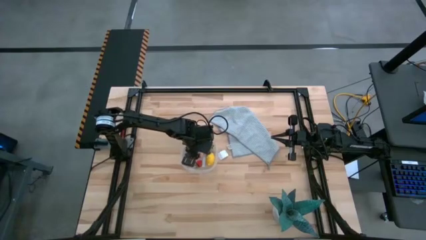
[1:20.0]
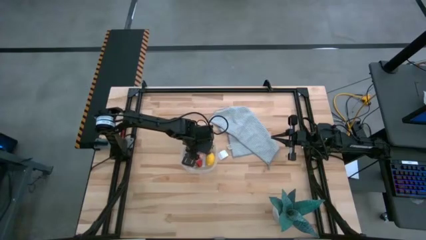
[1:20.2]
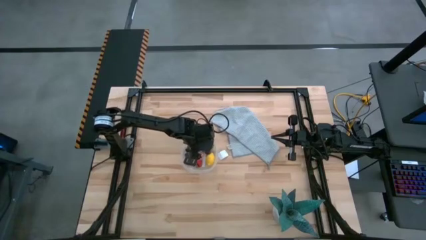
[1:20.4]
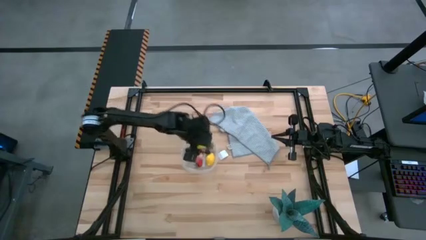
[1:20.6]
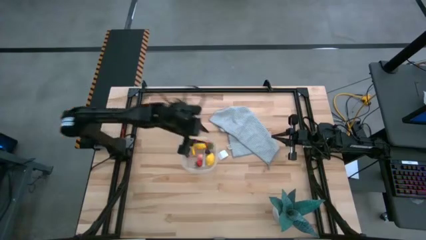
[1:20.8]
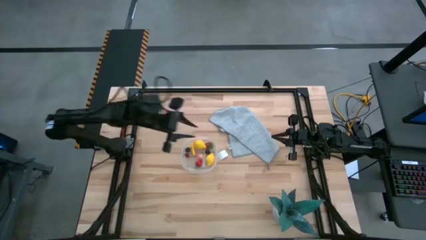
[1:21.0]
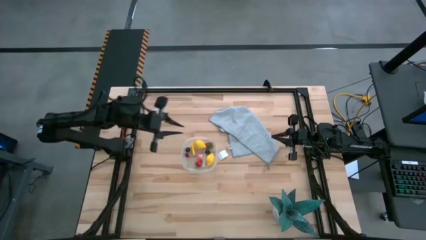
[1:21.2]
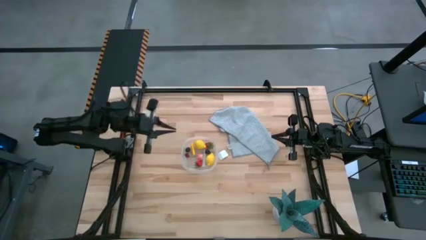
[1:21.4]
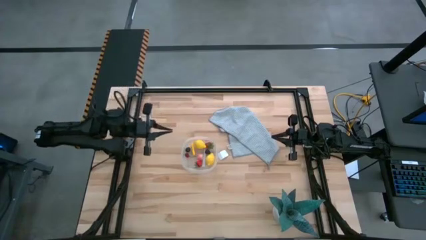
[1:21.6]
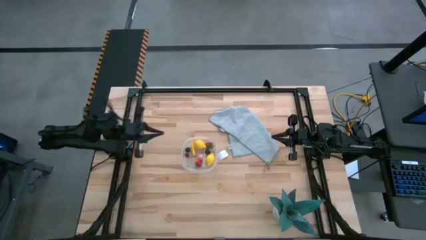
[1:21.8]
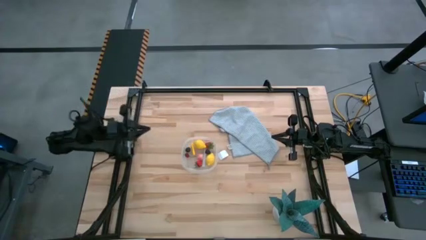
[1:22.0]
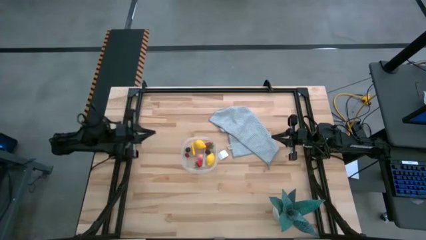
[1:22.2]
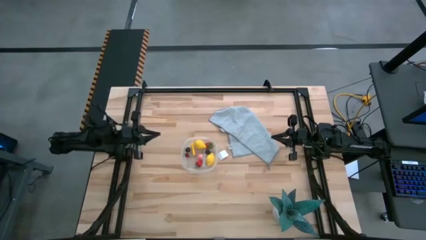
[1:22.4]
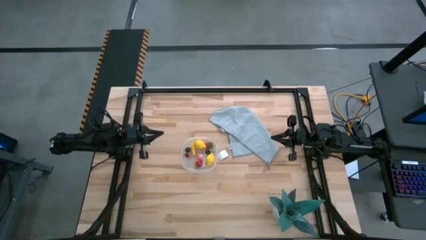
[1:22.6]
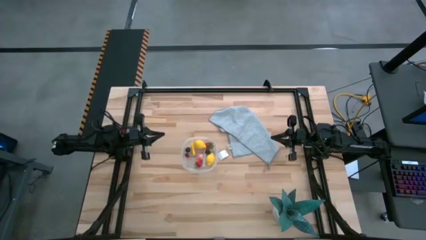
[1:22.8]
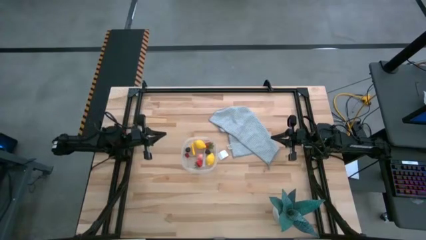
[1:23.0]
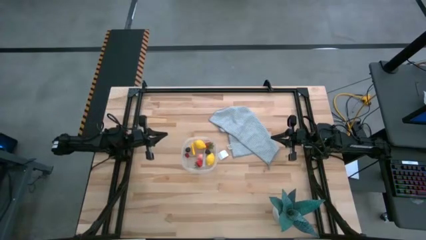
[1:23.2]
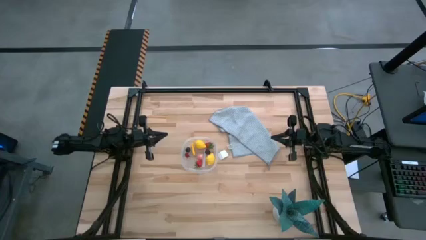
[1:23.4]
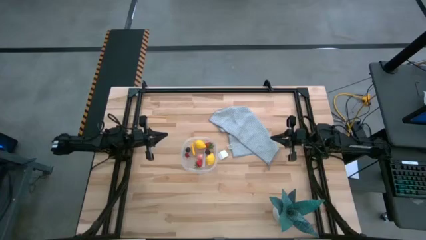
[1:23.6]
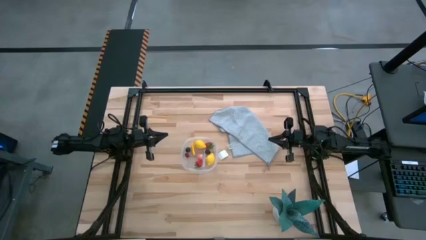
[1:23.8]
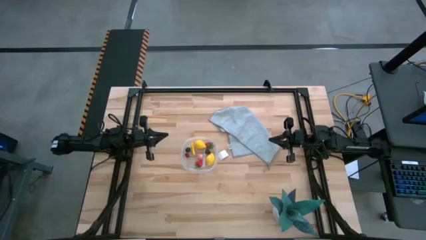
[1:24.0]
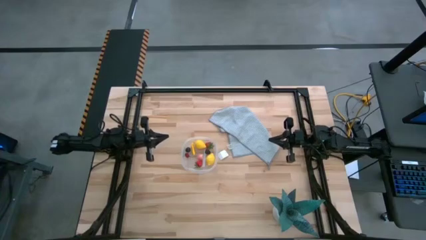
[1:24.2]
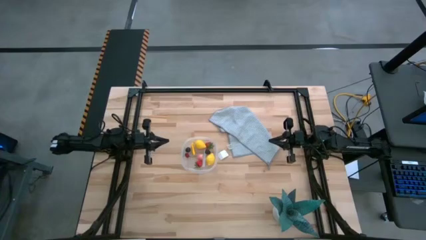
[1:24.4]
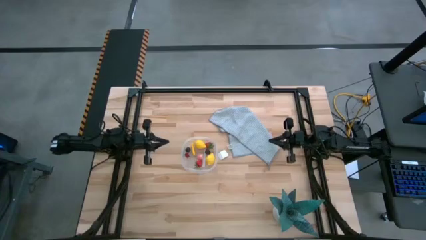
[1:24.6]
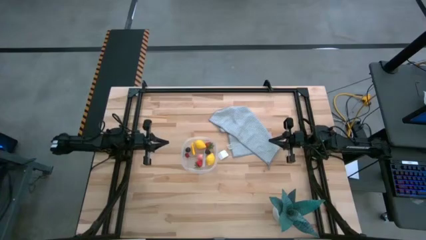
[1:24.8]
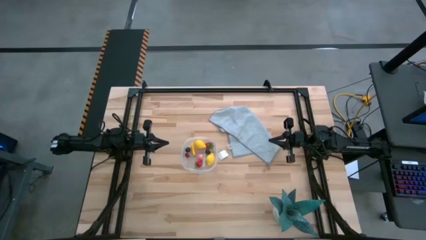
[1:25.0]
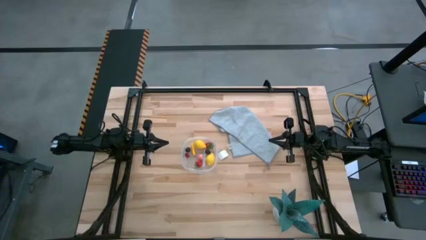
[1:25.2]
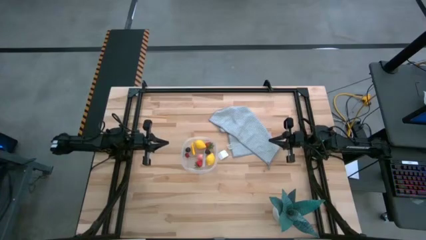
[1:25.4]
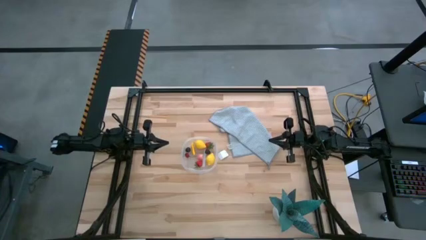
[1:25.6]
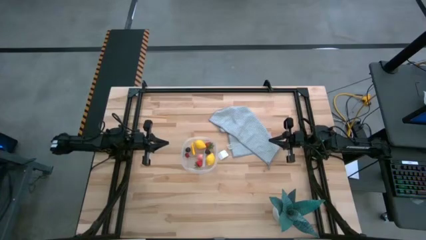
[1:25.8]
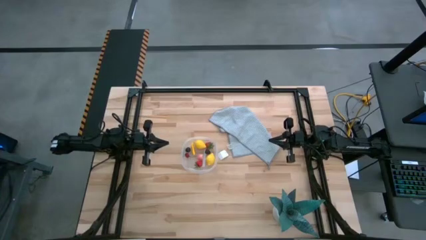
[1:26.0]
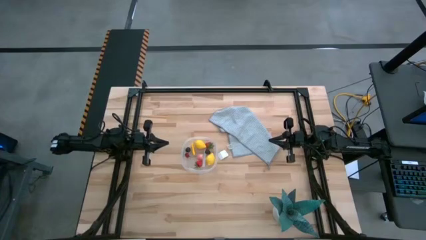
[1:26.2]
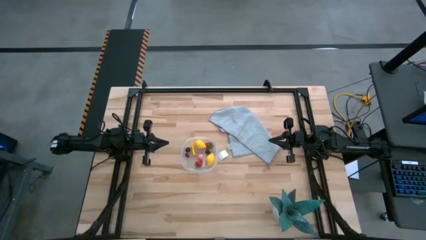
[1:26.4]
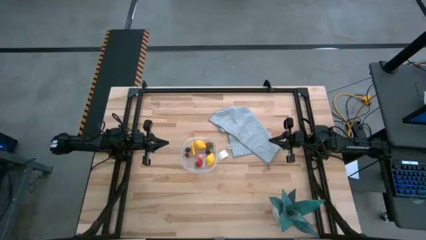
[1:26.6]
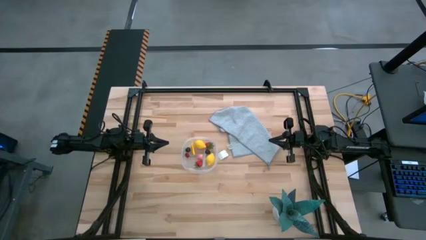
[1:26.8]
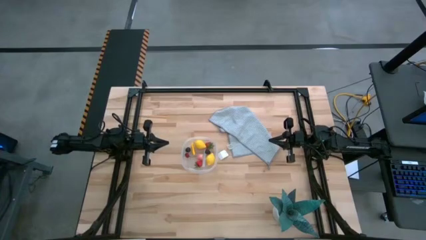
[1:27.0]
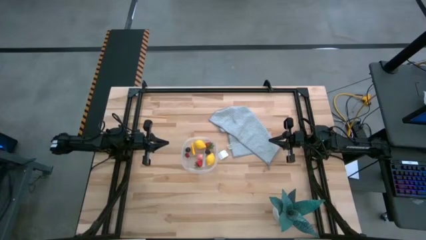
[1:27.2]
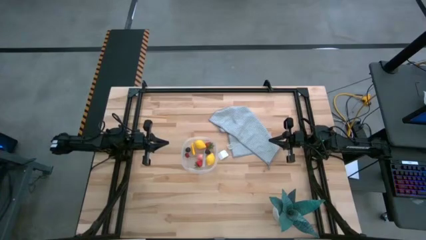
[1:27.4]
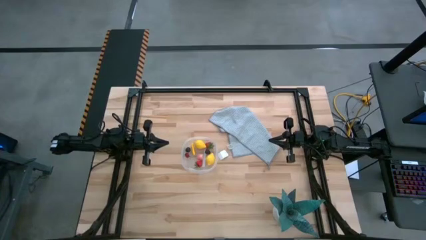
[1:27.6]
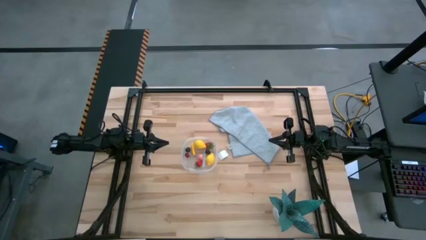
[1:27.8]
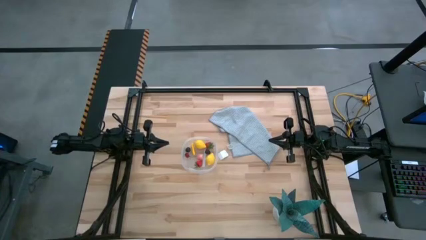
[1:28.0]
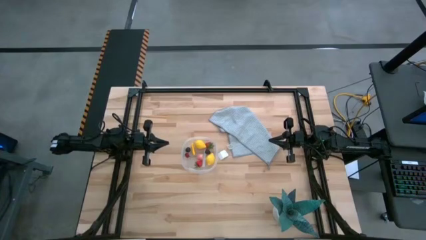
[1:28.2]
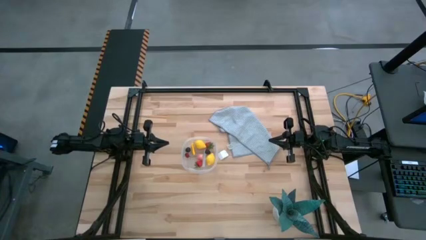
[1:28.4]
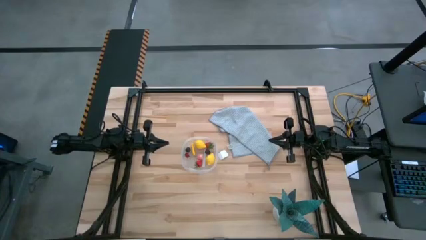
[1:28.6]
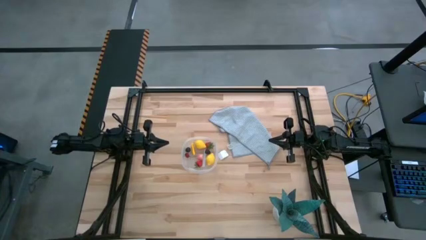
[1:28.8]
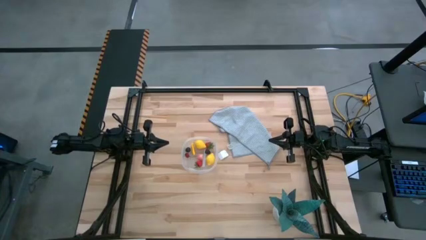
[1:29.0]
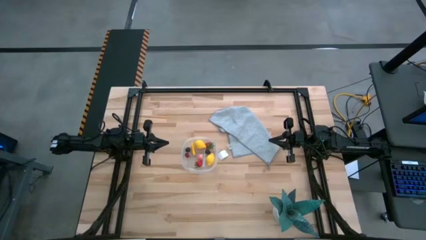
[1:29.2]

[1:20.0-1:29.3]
Task: Pick and placing Produce into tupperware
Return to Home Position

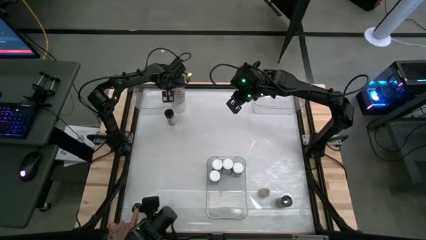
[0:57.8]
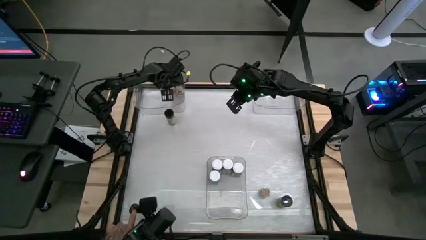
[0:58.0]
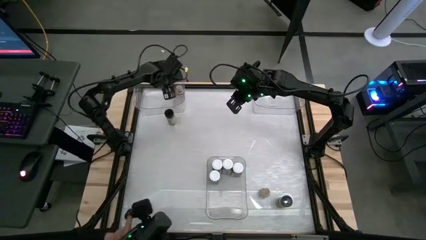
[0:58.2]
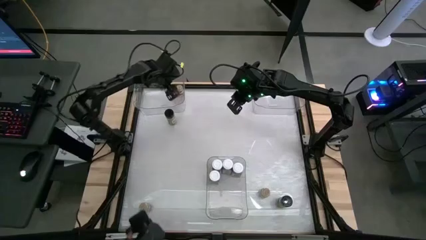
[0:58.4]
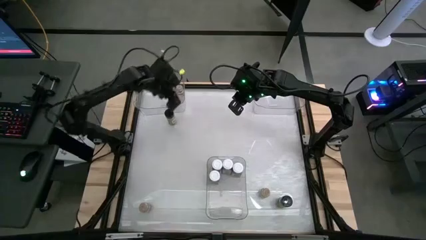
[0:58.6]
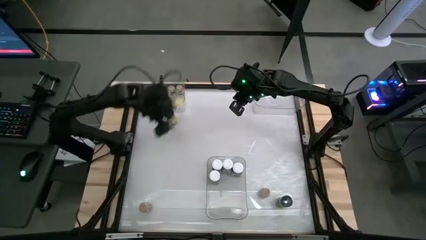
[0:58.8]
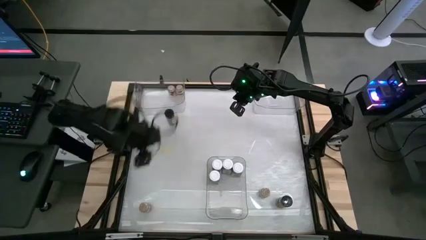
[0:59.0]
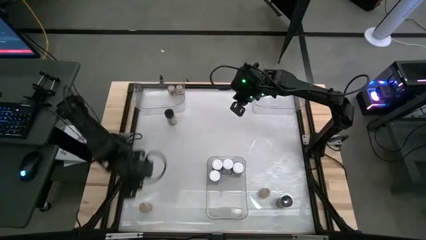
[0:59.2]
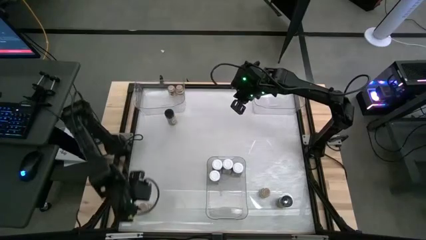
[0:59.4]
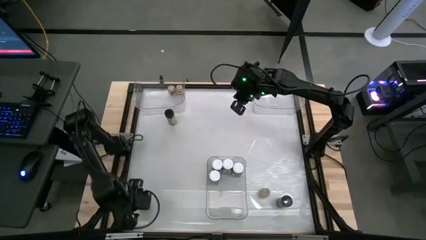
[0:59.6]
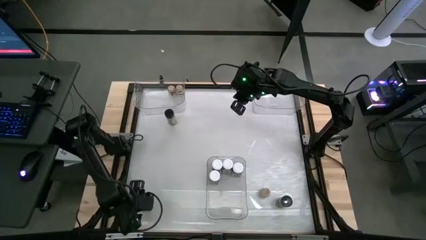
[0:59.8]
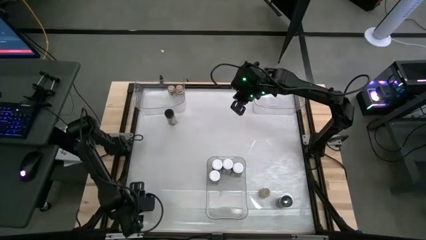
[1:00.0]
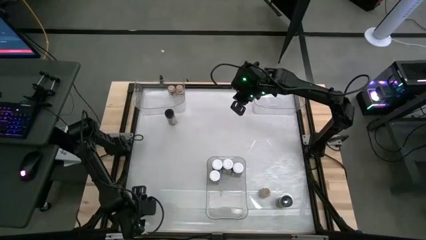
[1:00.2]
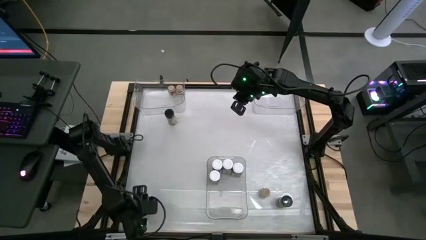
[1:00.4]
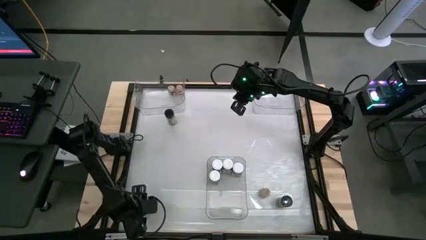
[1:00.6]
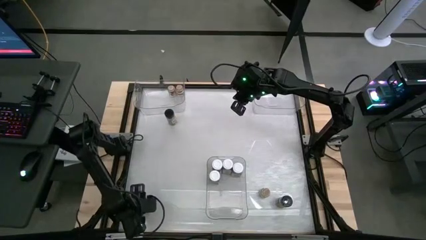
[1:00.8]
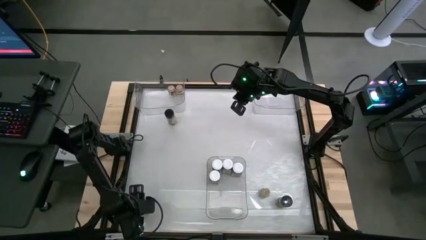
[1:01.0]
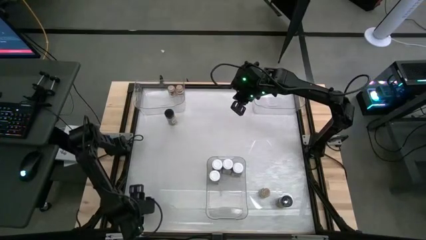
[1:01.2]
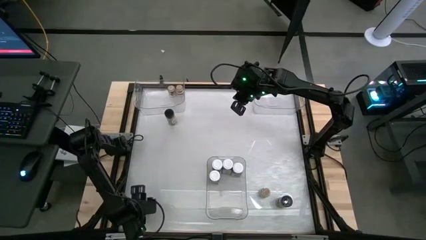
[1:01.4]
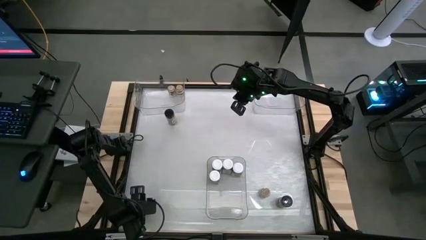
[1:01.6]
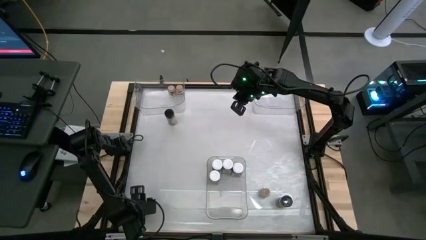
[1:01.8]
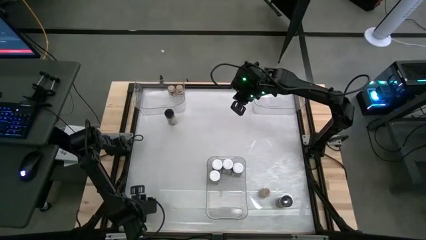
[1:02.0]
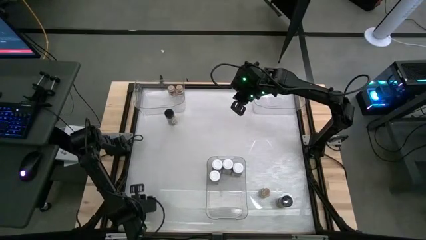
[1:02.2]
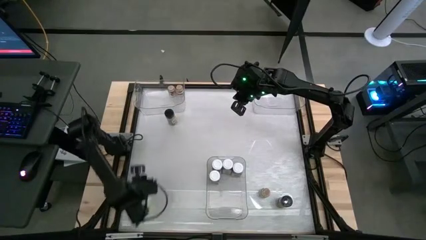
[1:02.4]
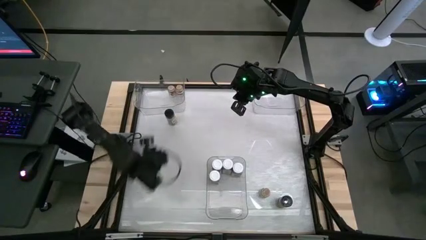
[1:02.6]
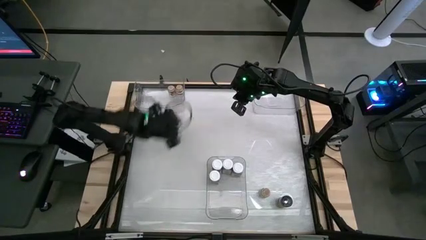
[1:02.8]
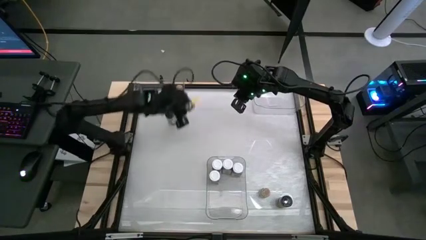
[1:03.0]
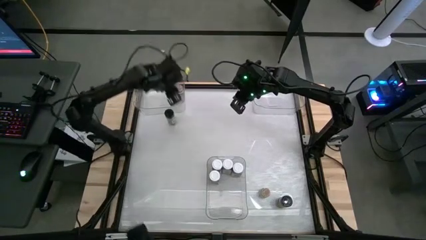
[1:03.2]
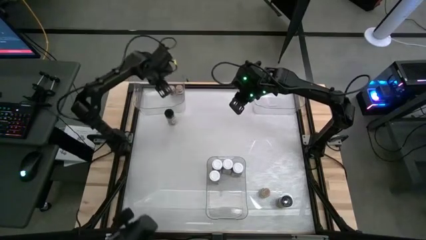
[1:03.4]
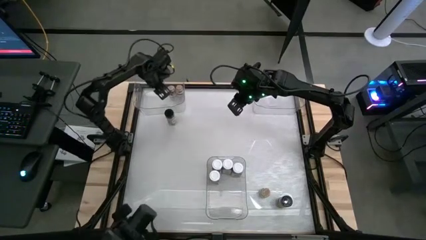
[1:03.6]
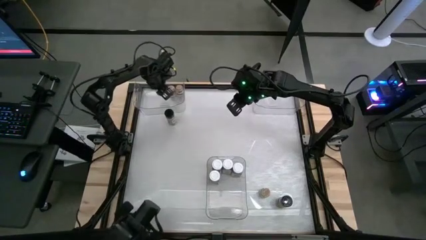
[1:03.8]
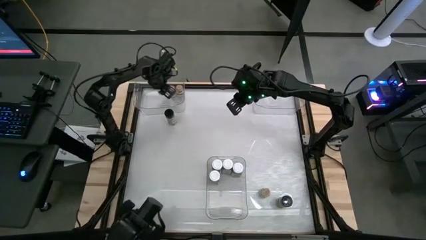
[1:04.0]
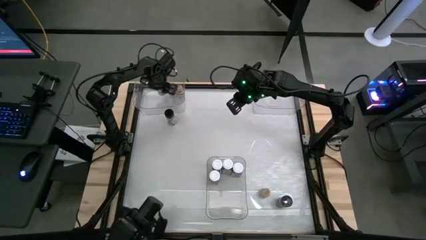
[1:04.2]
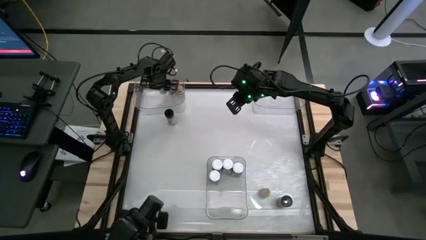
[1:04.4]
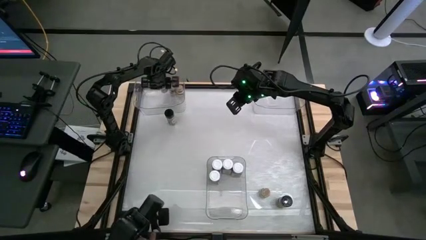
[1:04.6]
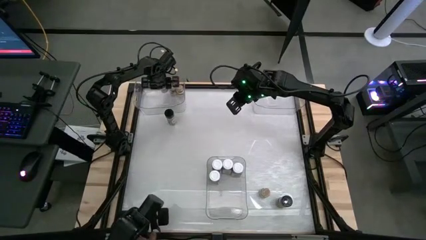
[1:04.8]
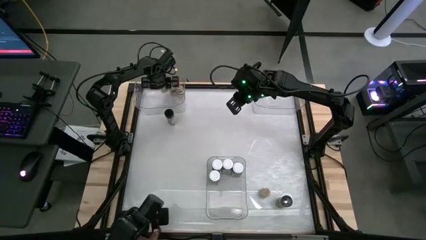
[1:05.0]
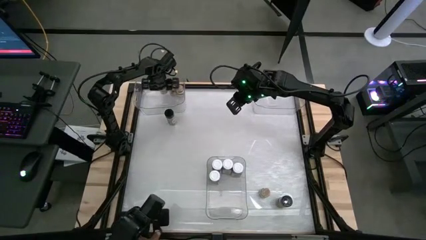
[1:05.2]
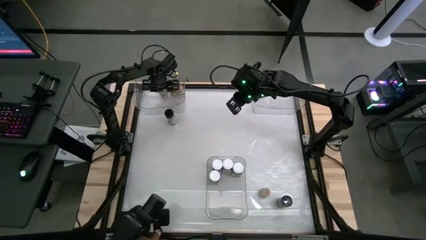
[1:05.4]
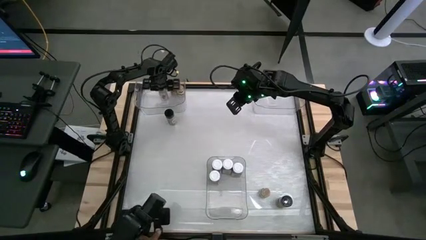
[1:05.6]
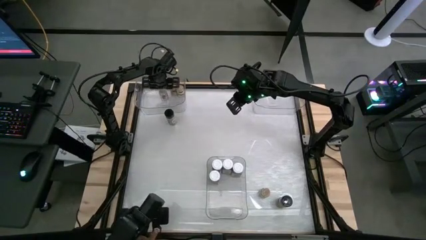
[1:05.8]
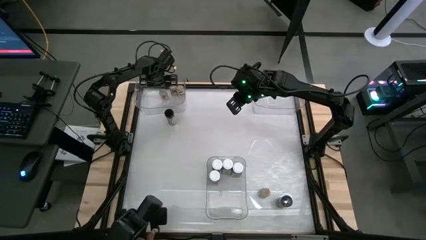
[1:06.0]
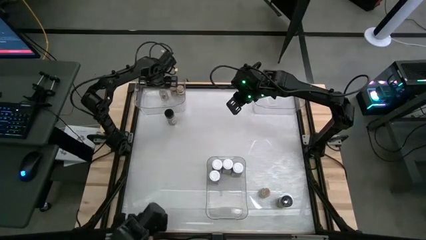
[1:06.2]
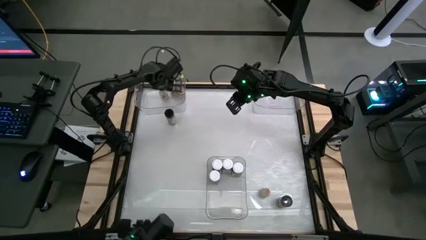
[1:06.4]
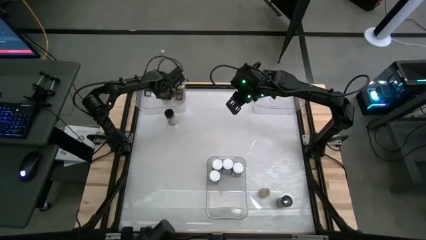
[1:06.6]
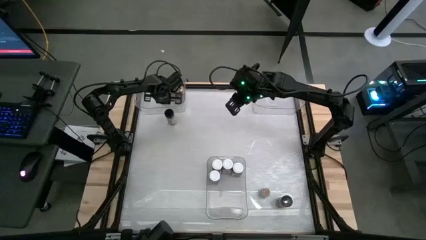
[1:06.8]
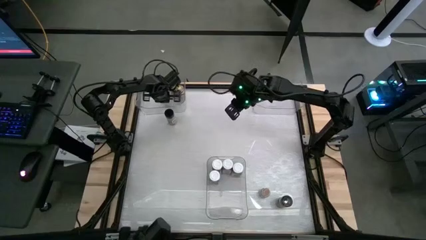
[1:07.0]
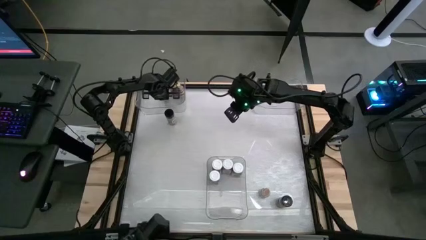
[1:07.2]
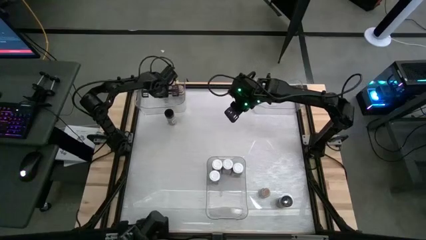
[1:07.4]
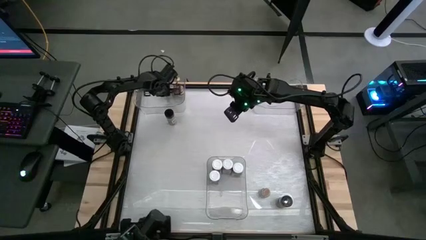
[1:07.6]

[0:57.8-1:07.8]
Task: Sort spices by type
Put the left brown seasoning bottle into the top left transparent bin
